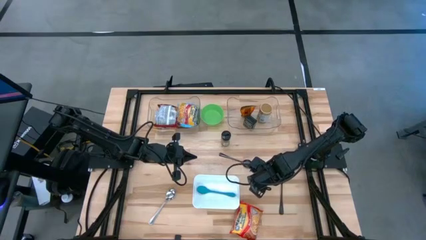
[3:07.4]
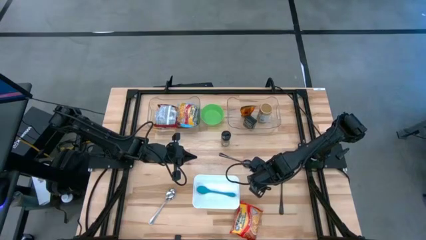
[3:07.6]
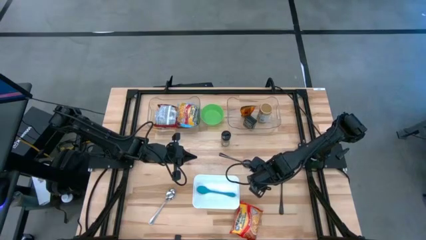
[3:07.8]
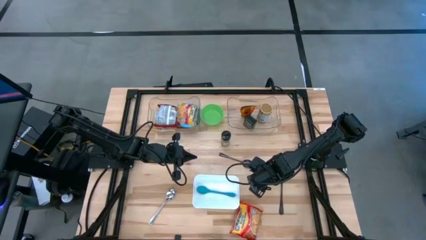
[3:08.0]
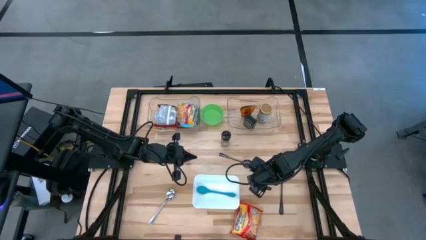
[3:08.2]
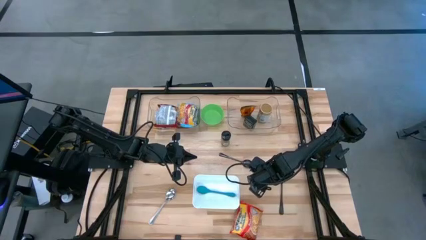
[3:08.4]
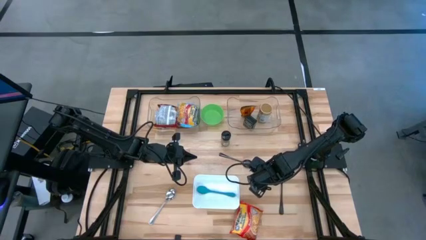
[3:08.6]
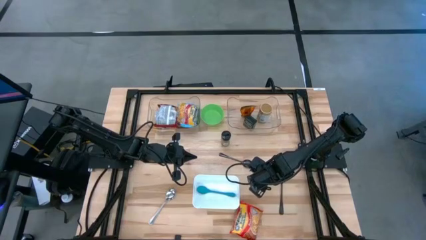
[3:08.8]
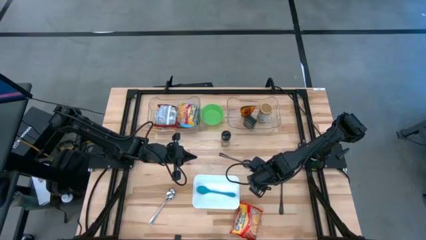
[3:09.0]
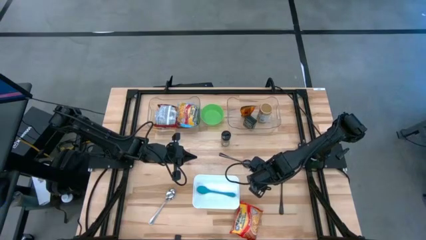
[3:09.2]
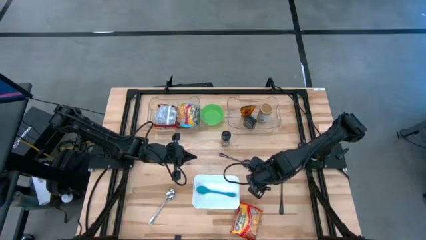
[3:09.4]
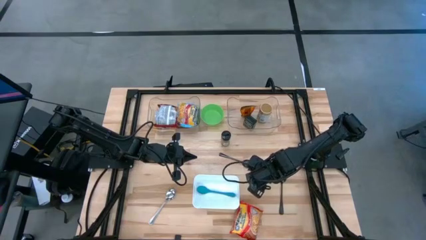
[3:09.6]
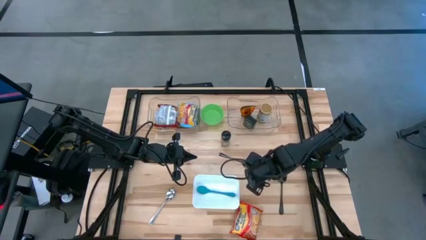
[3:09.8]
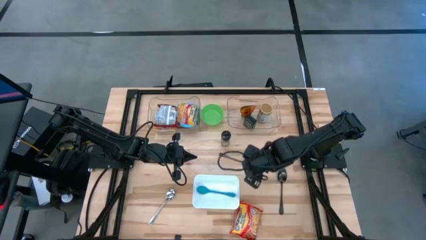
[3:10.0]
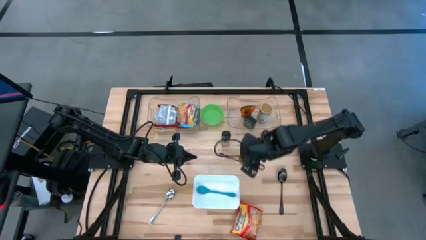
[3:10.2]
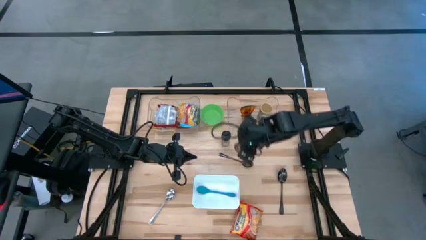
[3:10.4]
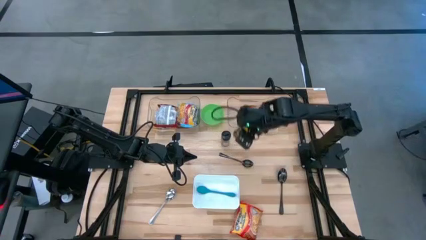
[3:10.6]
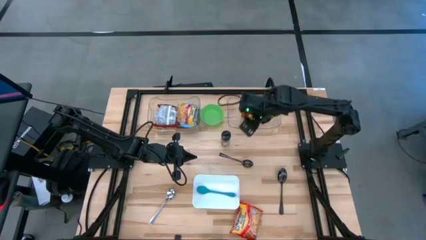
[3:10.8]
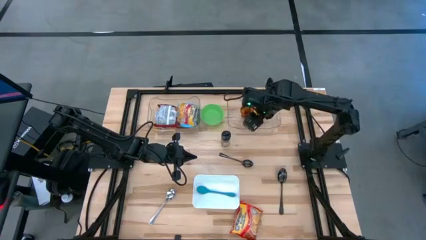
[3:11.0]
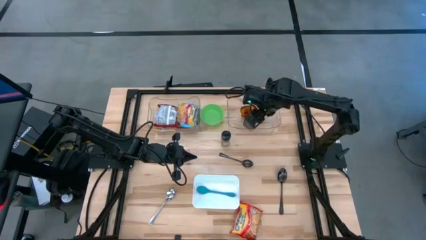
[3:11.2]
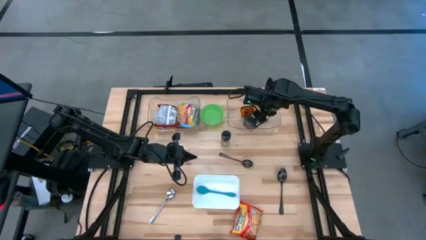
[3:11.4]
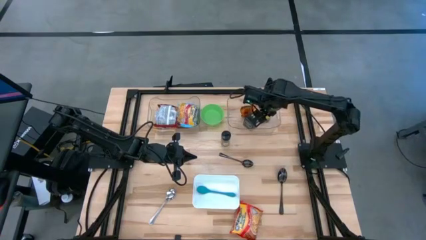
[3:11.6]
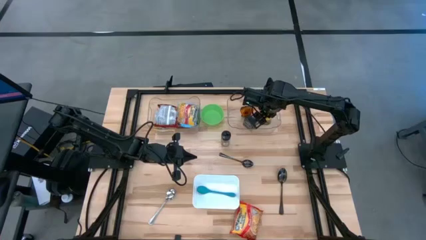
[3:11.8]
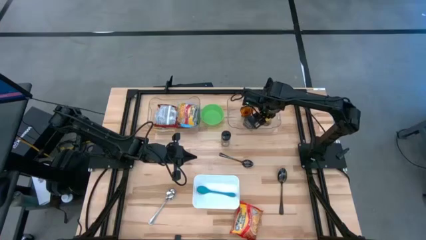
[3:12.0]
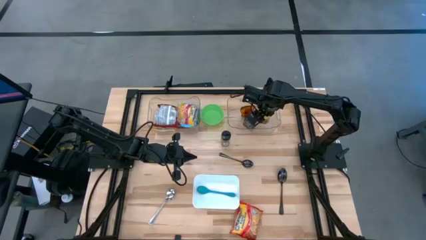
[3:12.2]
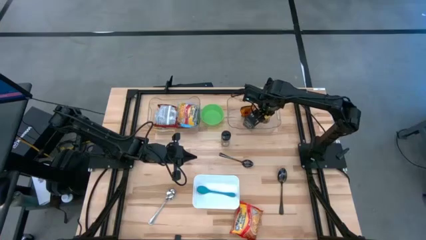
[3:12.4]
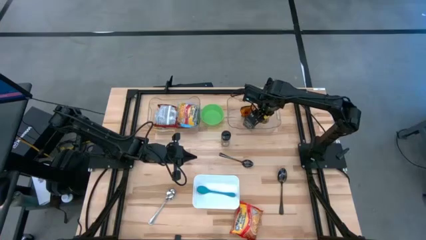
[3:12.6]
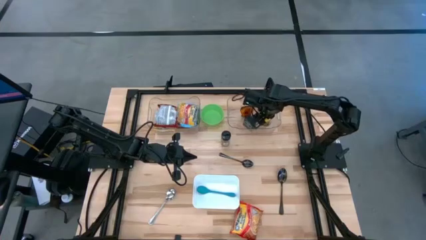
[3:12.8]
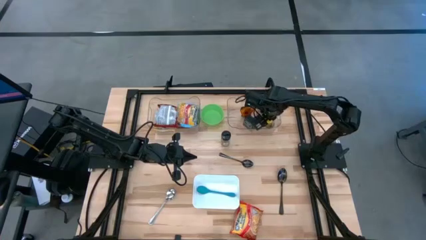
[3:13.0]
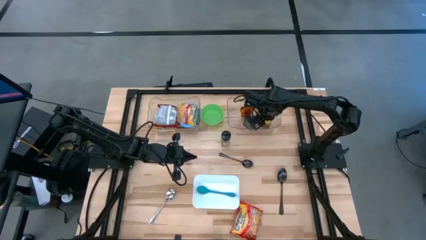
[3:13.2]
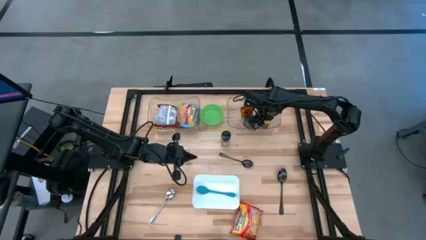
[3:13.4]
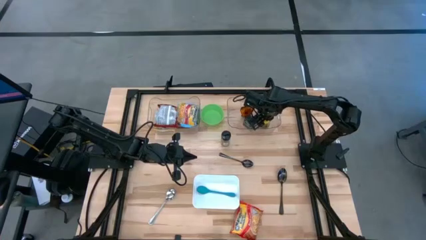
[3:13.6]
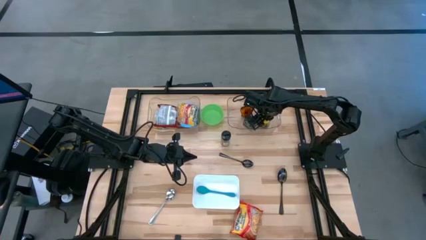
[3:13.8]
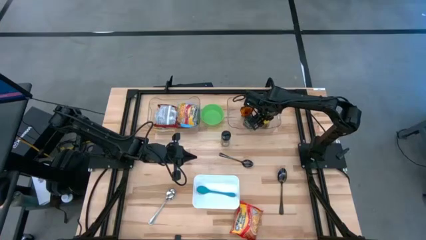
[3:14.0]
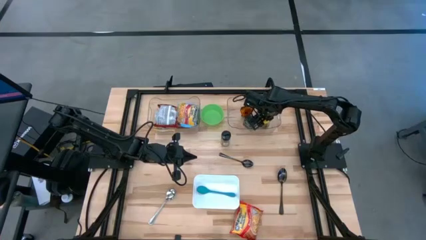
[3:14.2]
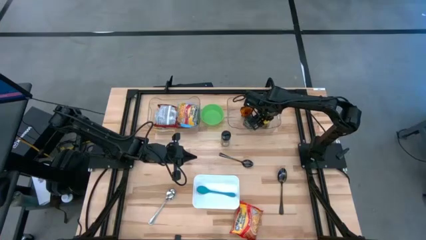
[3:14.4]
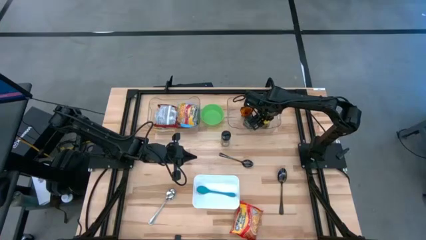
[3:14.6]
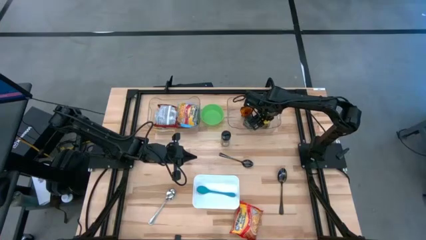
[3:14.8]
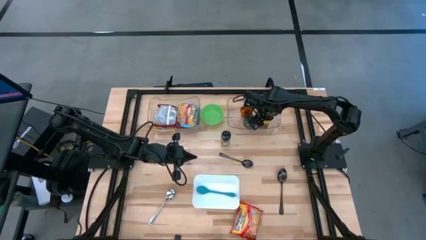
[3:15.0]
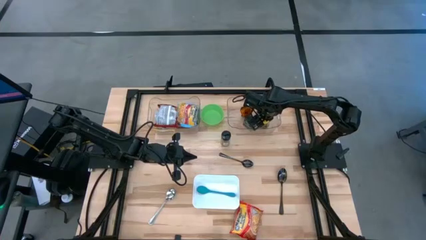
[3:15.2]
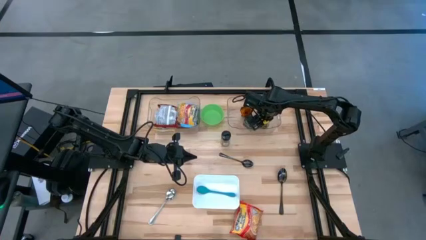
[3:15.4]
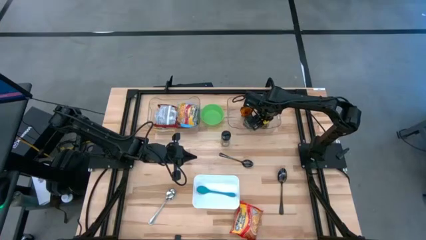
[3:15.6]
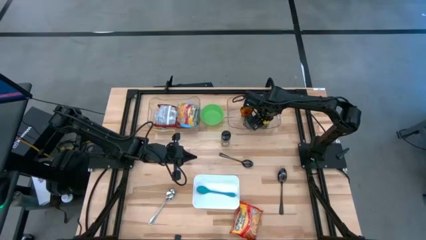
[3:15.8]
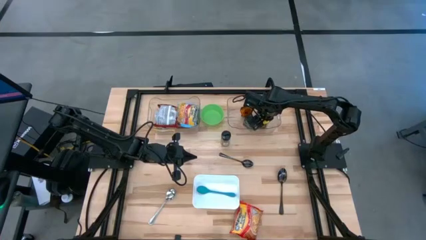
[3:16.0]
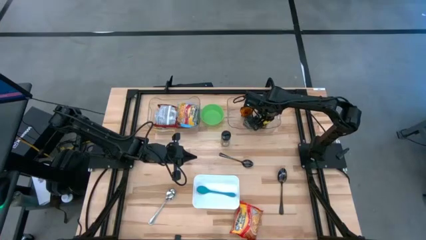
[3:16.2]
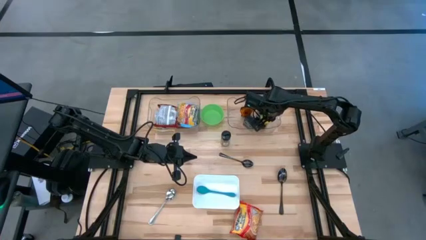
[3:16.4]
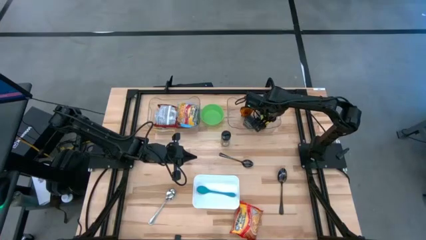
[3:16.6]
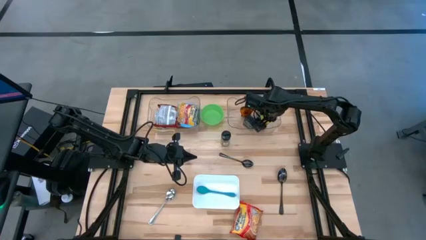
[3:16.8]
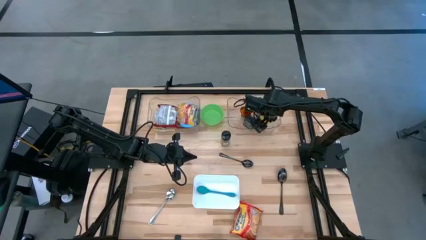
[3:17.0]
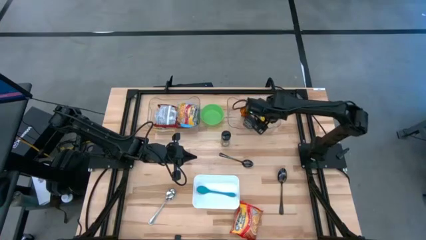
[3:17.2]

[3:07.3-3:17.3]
Task: Pick & Place Food Item
Put the yellow seasoning into the right transparent bin

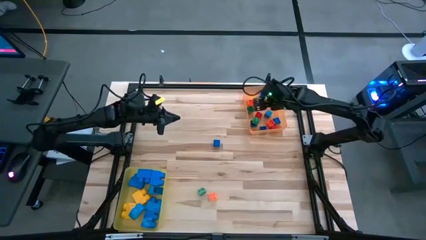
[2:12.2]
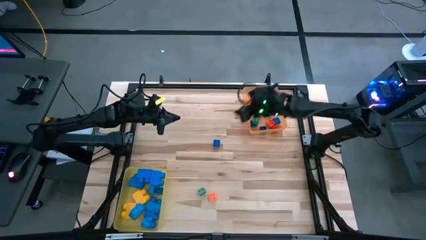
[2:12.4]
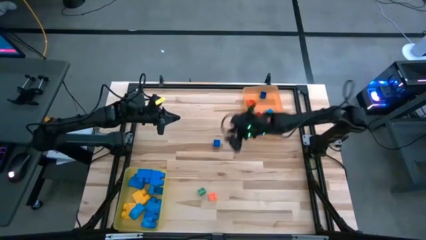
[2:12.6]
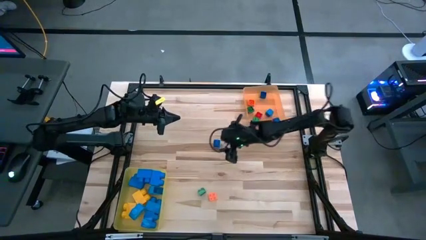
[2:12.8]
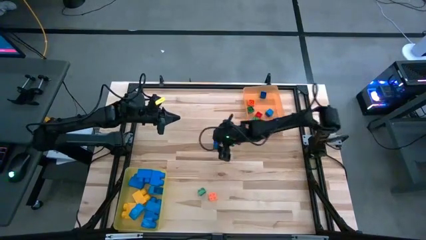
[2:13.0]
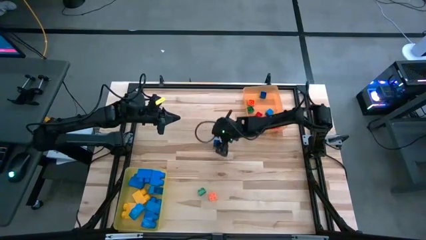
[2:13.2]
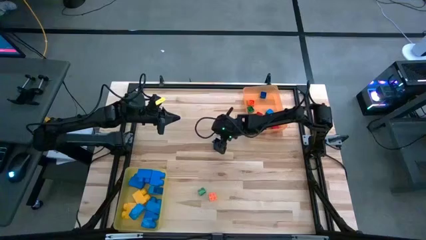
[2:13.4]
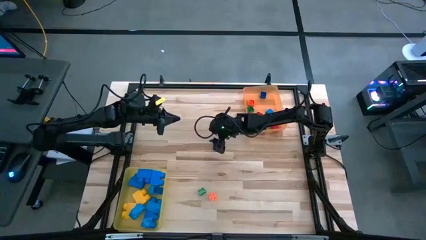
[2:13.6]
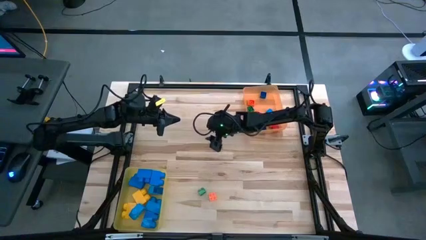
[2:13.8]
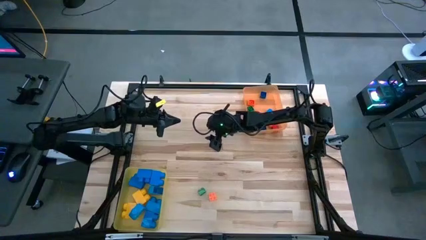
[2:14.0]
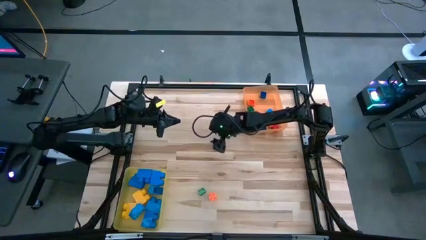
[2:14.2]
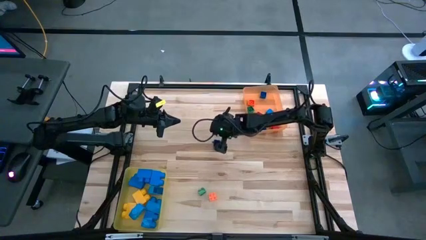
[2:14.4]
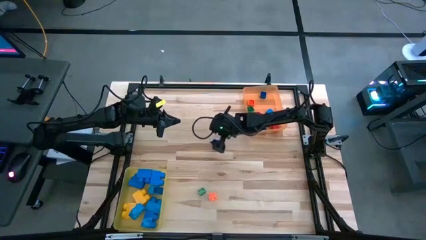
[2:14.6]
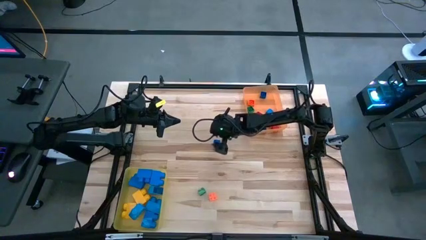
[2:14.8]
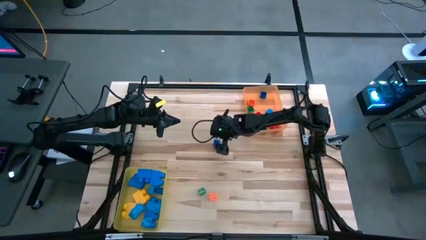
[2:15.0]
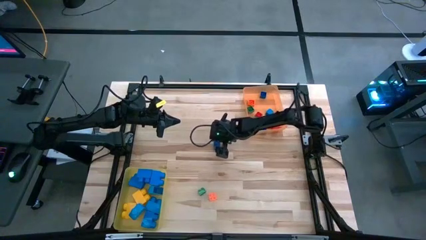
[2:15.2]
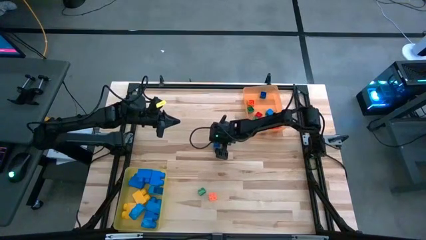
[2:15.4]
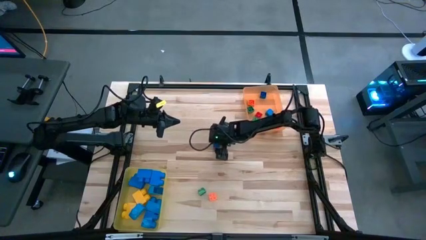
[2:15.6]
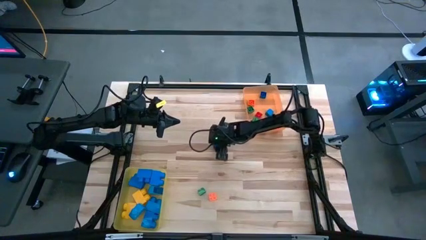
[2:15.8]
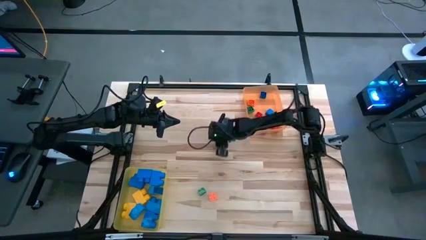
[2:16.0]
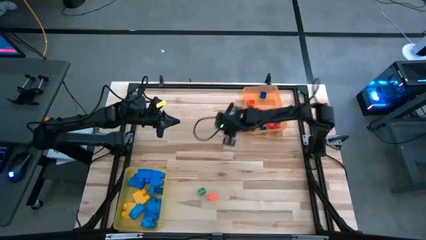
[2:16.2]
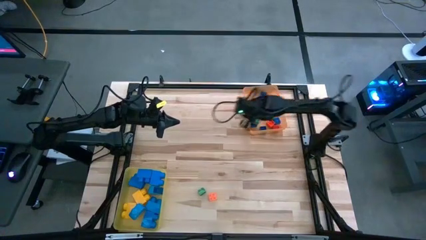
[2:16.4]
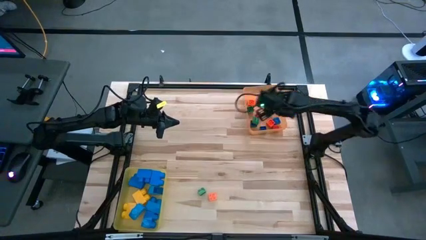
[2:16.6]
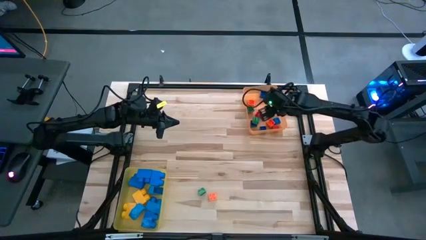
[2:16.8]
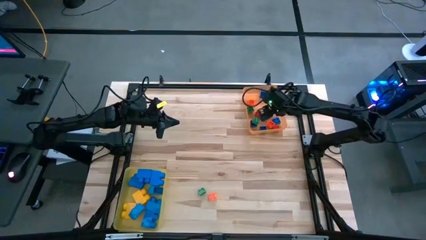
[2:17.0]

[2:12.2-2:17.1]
Task: Sort blocks by size
Put the small blue game piece into the orange bin

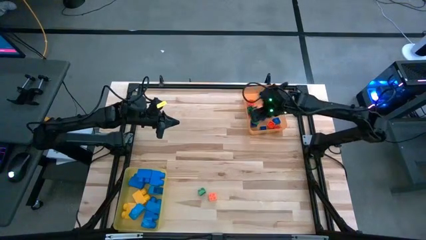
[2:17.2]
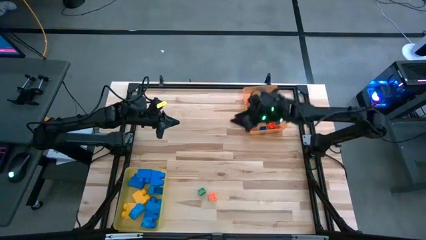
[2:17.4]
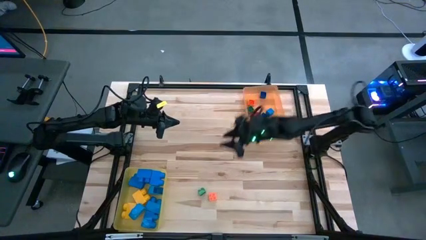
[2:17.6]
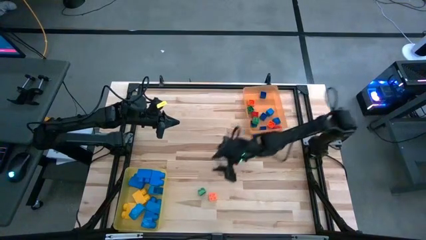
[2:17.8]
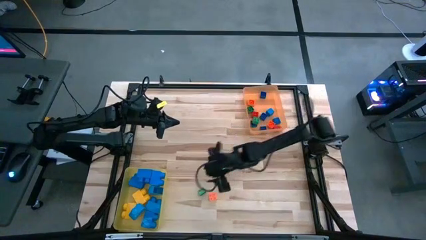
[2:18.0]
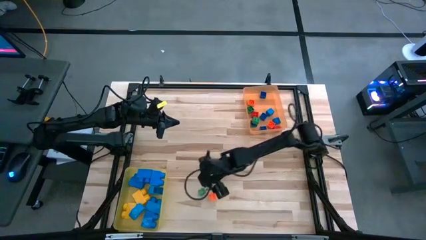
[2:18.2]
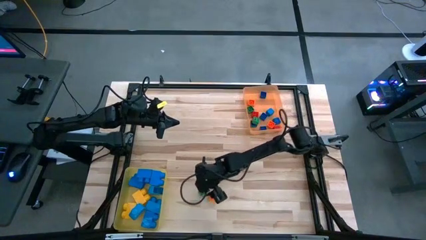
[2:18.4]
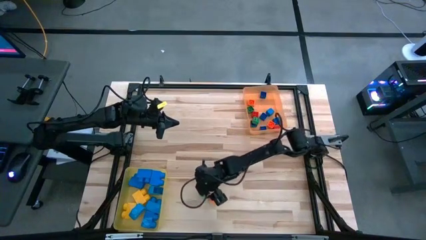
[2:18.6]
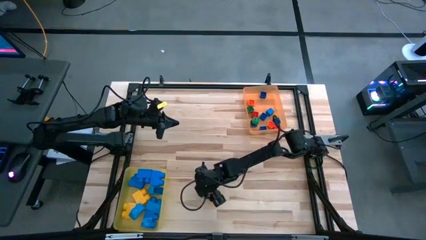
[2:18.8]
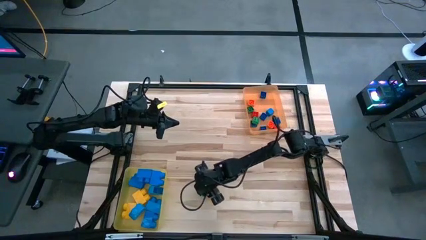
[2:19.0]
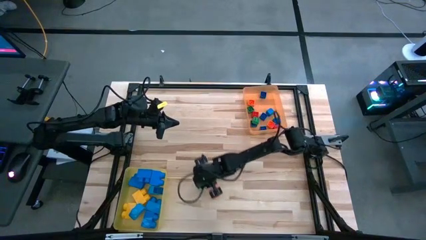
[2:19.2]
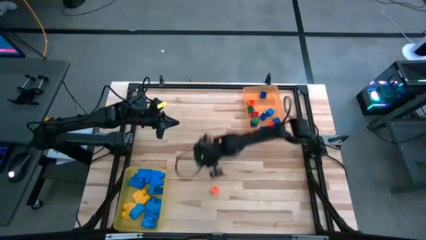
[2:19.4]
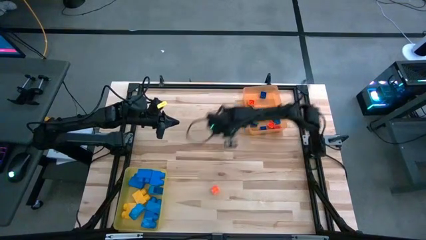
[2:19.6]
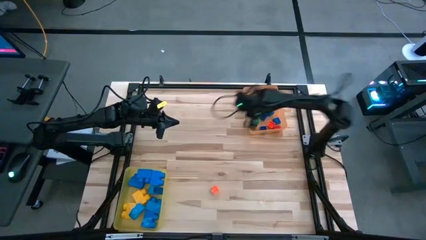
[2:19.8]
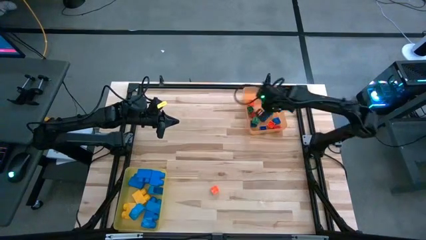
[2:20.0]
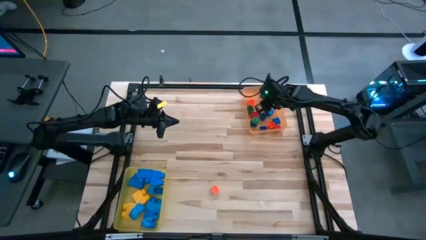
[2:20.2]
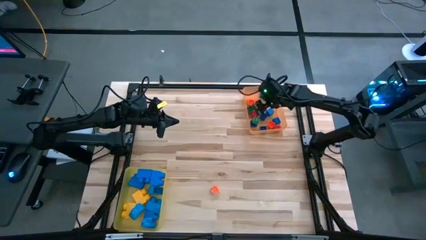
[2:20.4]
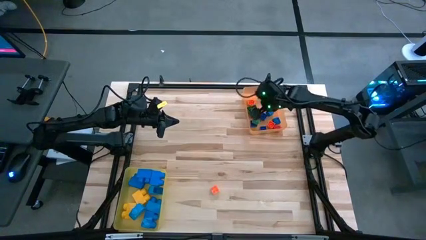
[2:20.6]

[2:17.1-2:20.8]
Put the small green game piece into the orange bin
